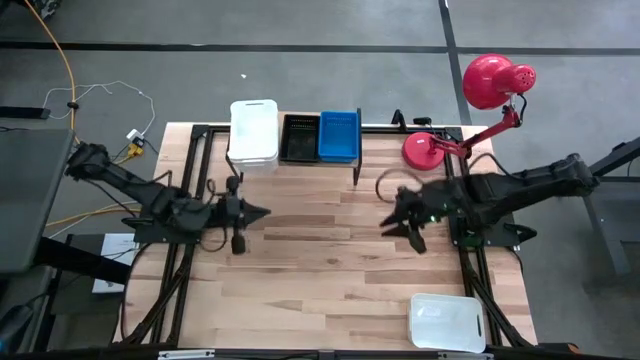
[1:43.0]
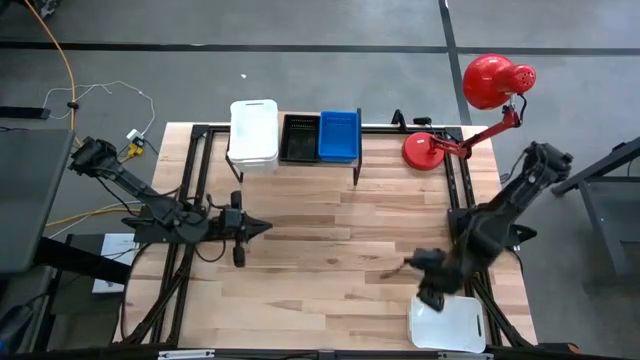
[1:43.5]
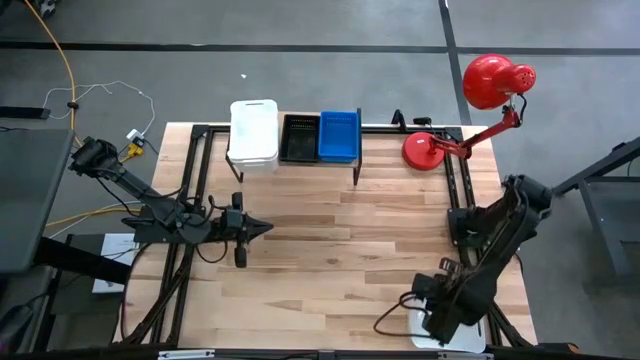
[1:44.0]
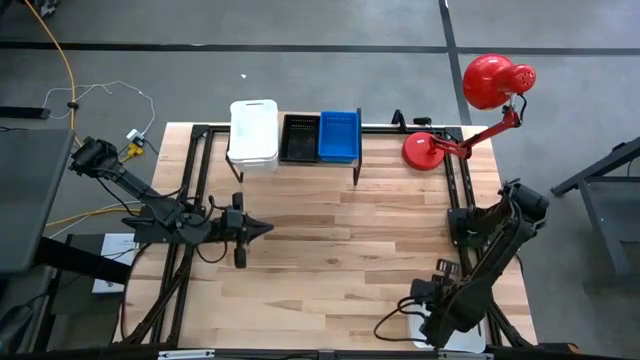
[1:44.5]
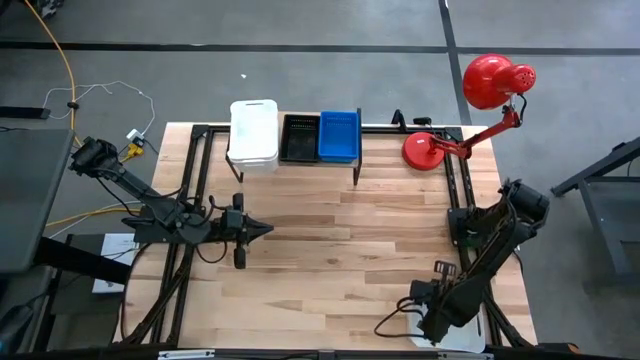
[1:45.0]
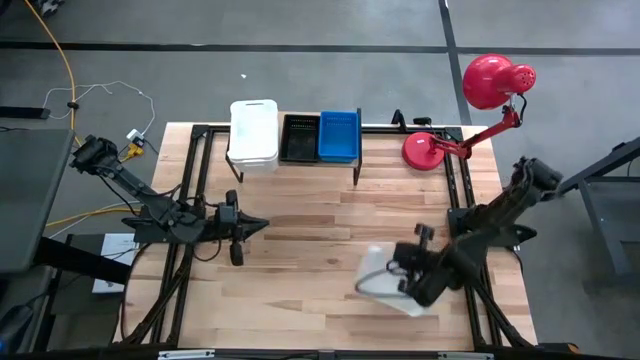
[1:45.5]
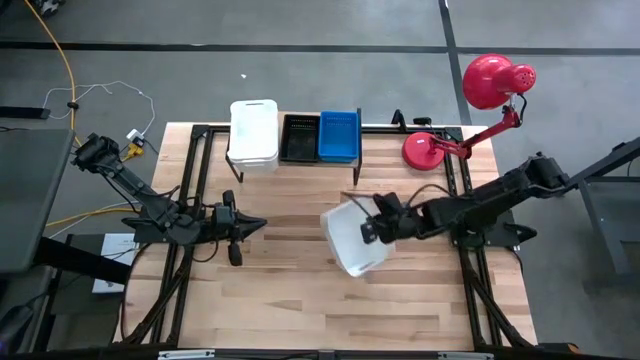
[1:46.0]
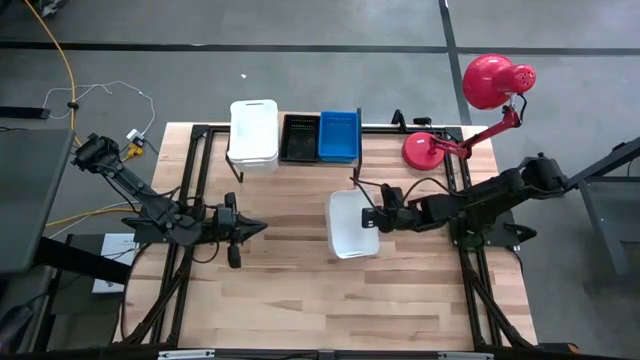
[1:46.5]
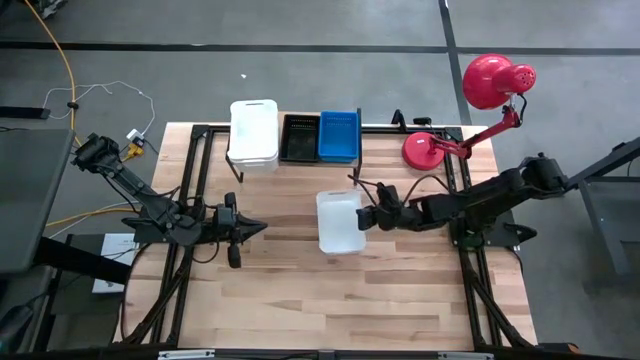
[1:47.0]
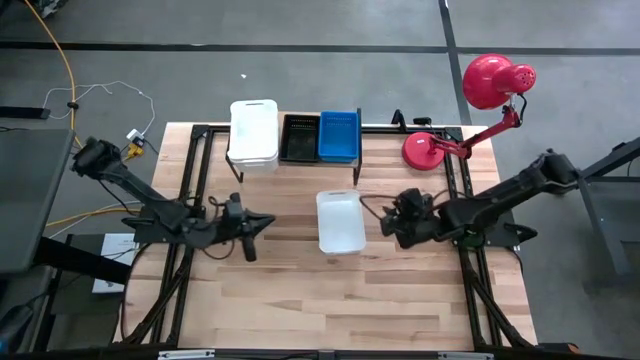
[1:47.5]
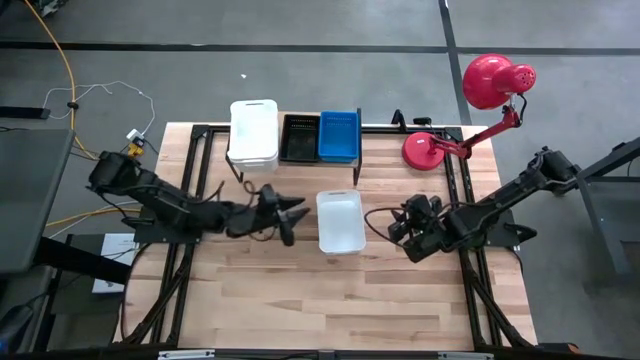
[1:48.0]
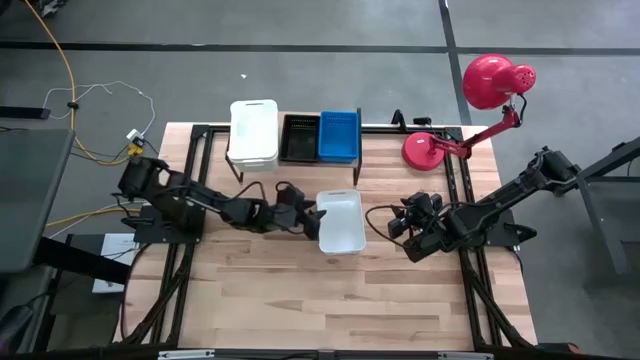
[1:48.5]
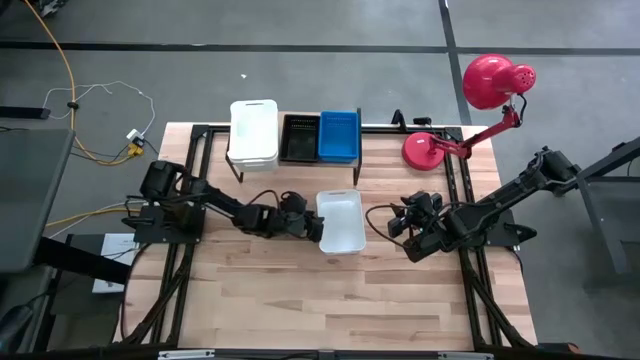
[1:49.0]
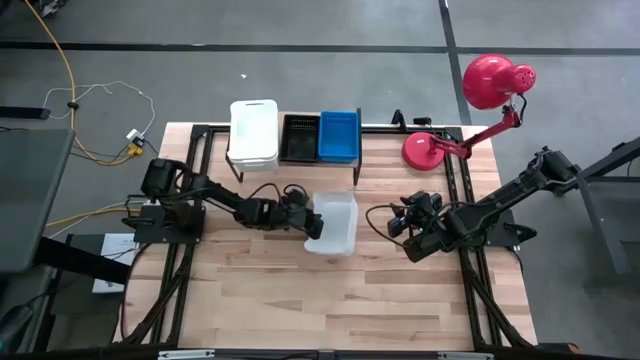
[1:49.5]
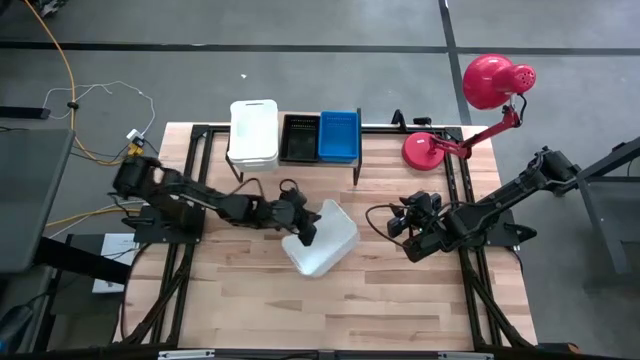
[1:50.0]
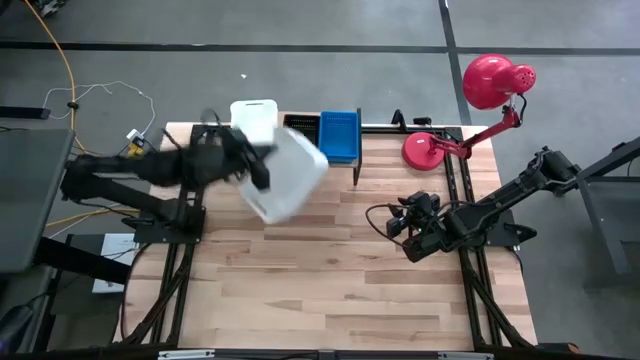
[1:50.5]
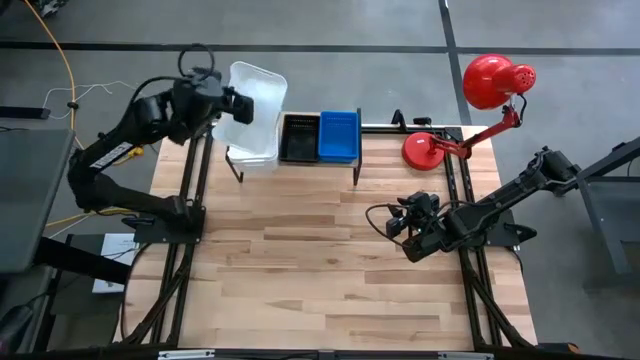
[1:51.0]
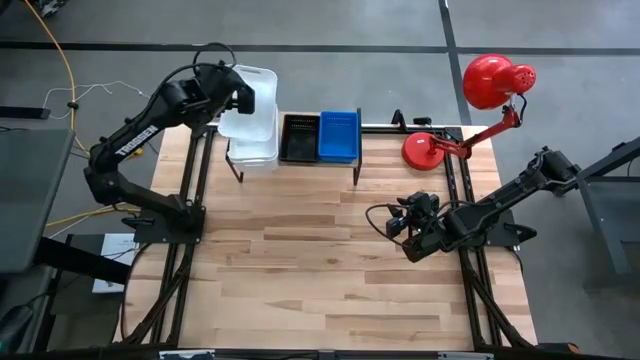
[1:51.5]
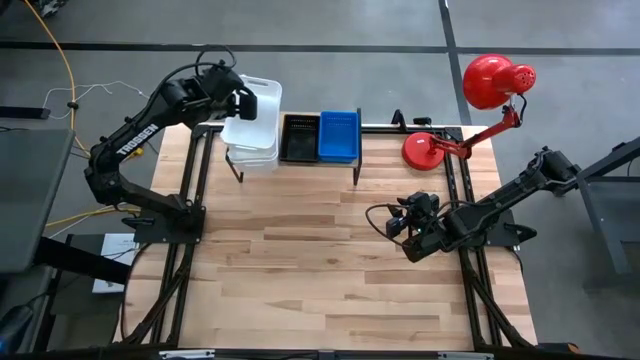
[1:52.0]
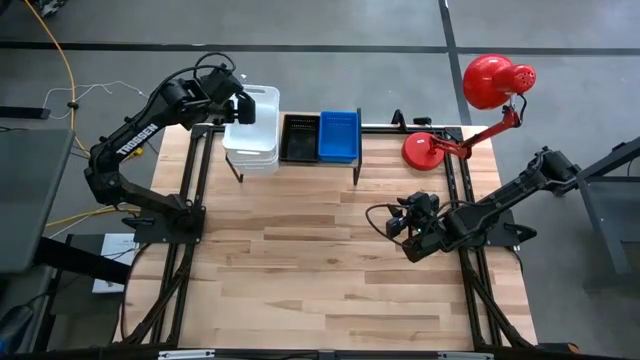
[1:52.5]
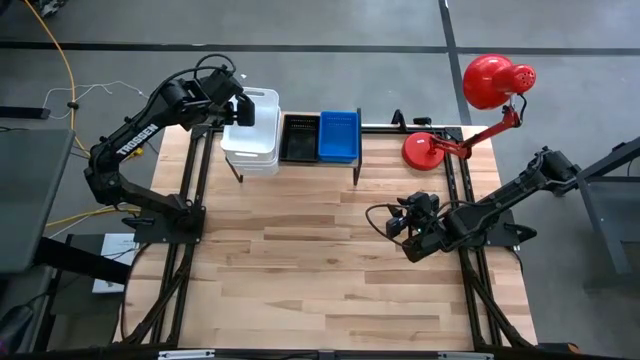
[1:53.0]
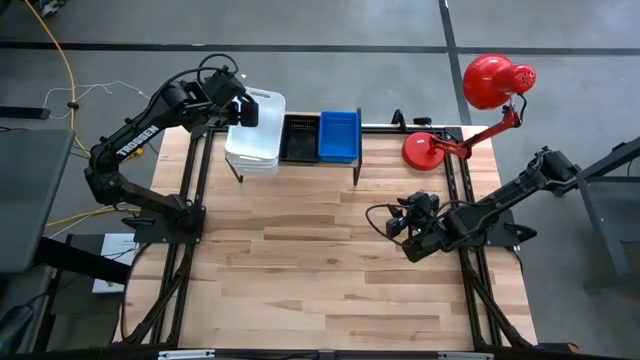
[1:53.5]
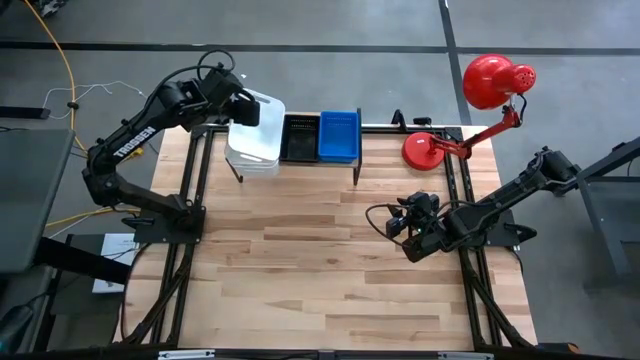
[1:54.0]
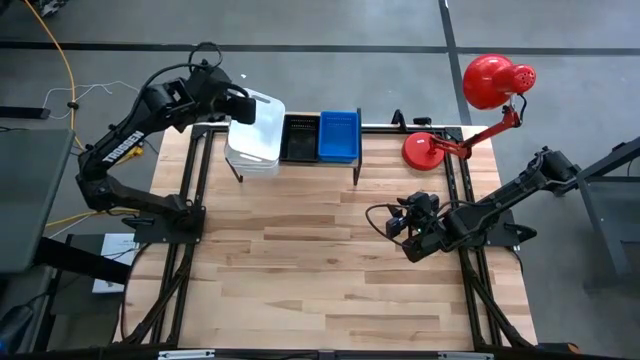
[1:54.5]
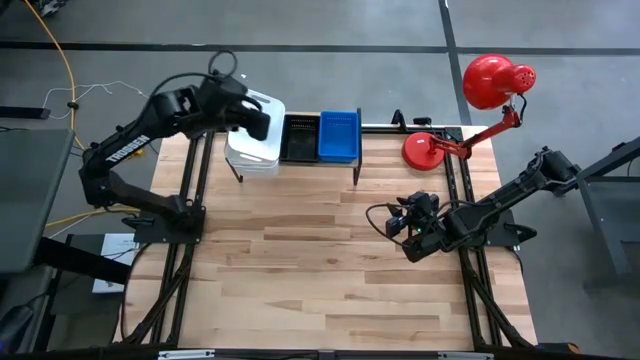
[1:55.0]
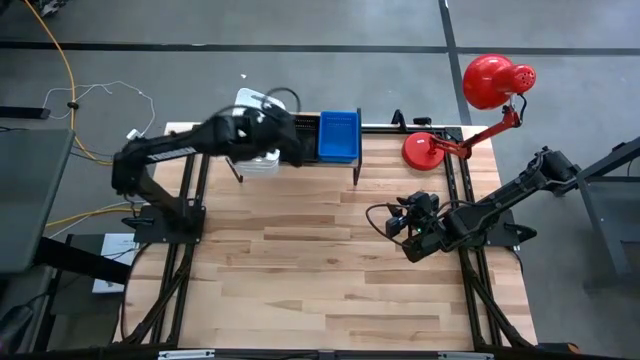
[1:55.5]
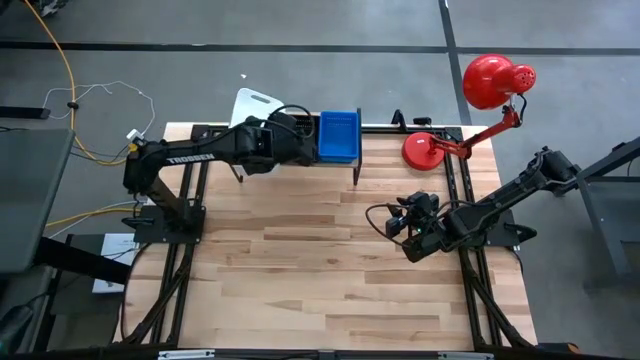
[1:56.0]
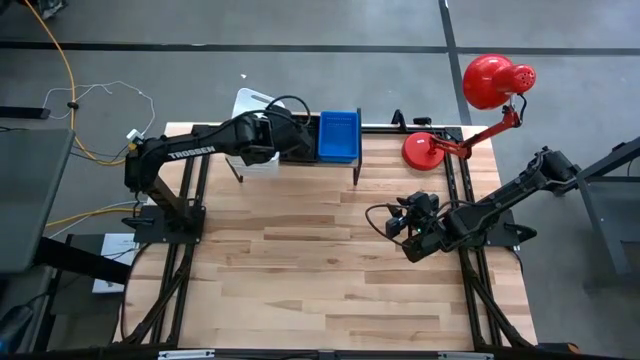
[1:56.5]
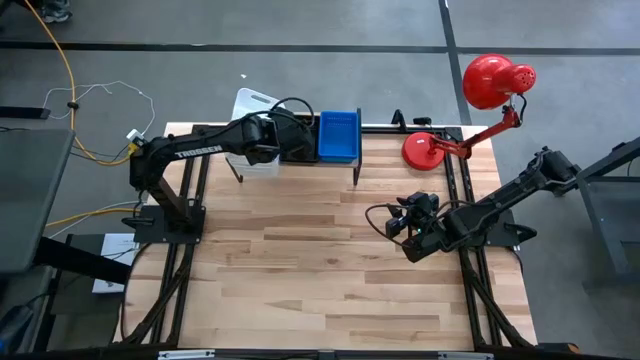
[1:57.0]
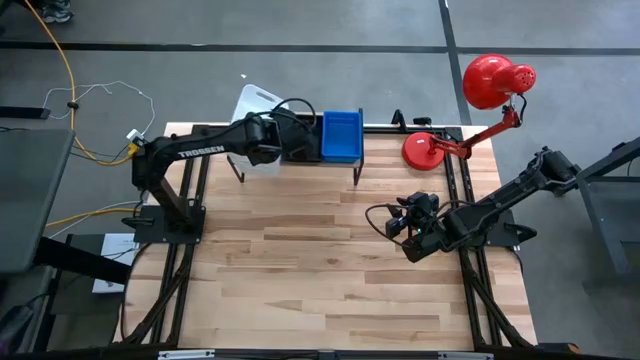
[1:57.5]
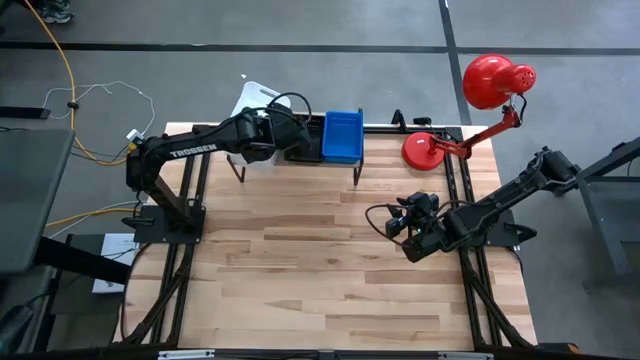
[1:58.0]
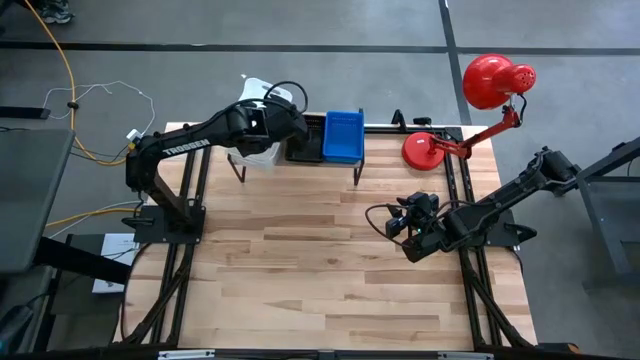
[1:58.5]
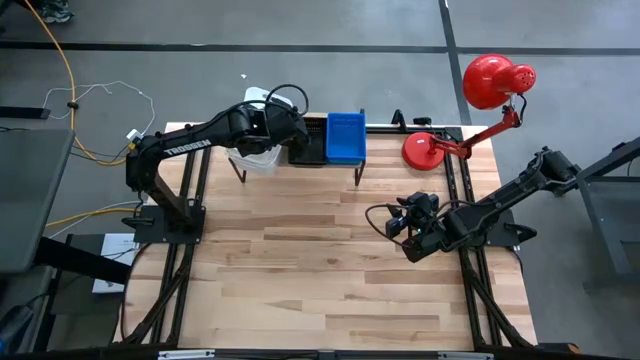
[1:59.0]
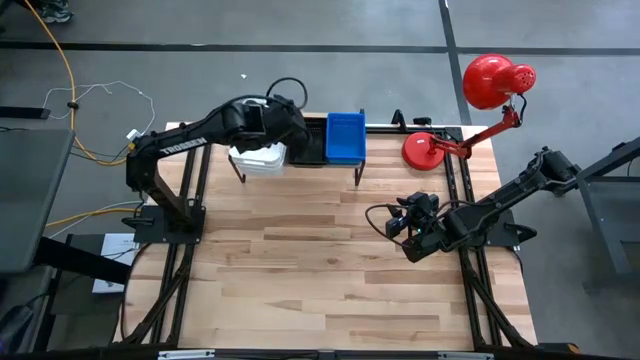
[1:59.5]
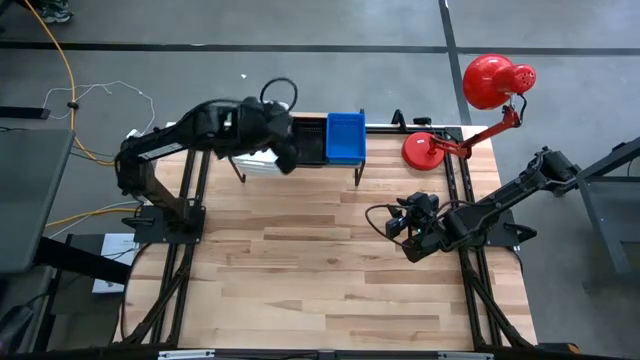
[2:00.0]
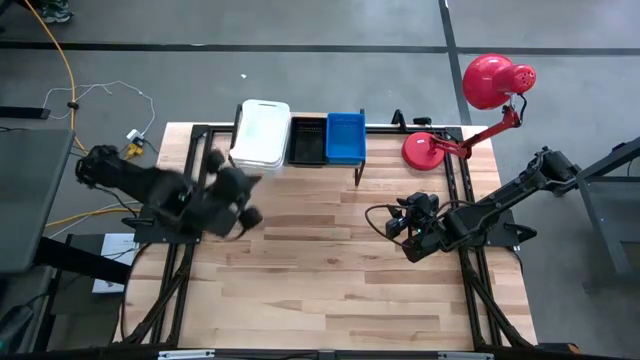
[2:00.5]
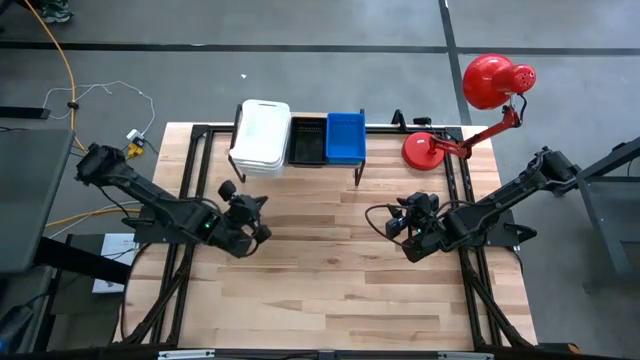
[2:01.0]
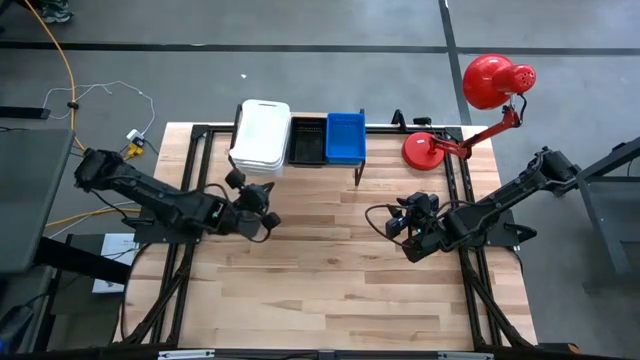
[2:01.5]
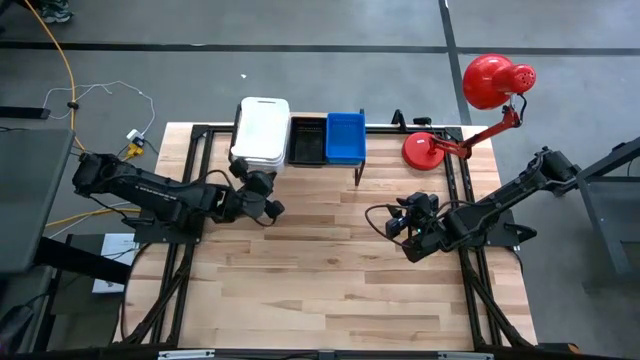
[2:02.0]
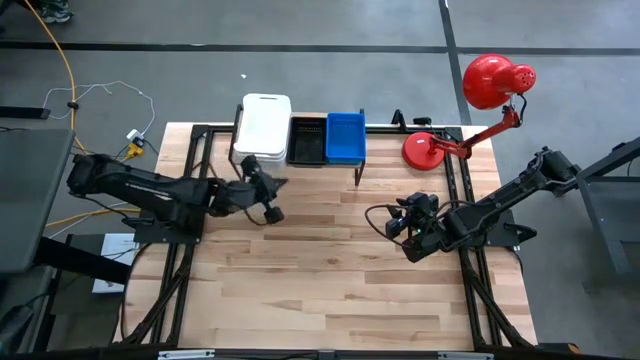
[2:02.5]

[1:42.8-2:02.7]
Task: Stack baskets on shelf by color
Stack the white bin on the white bin on the shelf

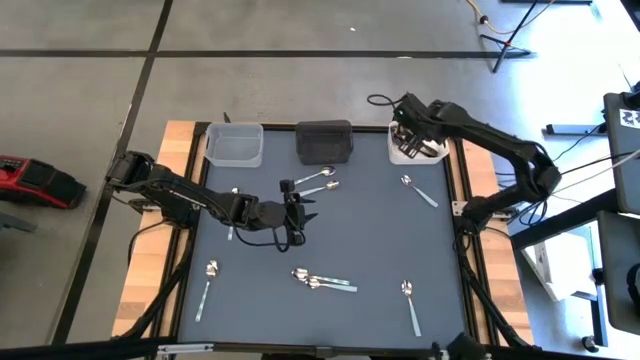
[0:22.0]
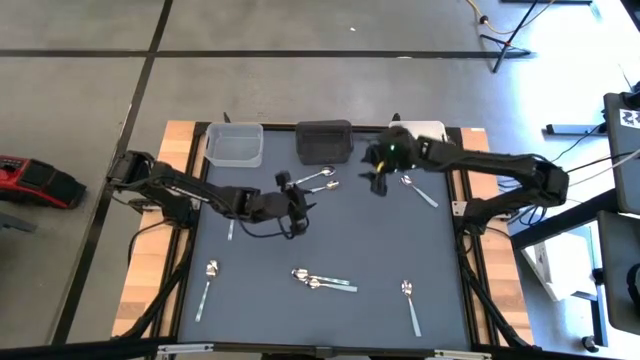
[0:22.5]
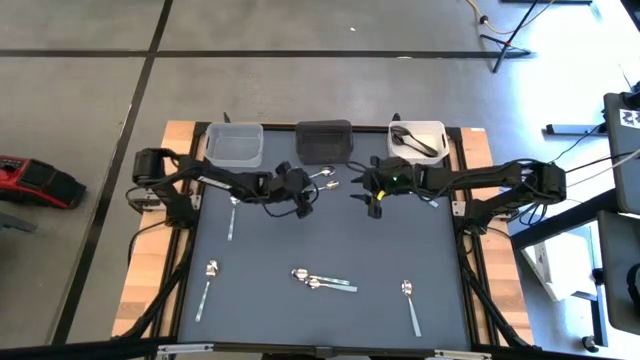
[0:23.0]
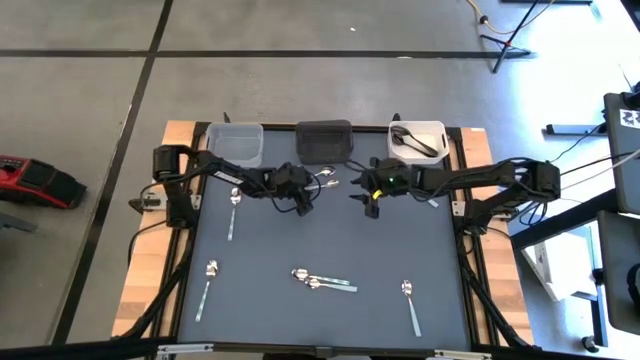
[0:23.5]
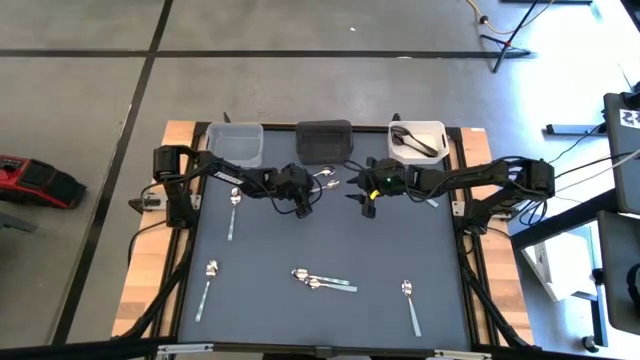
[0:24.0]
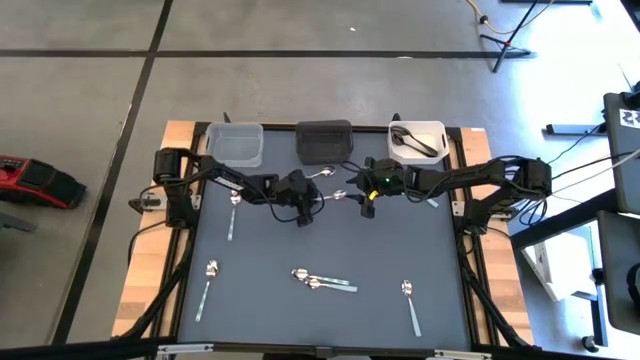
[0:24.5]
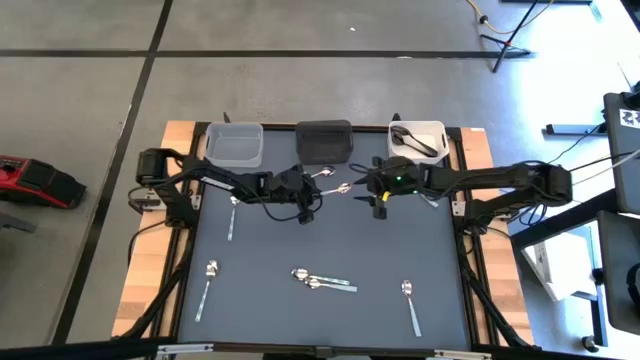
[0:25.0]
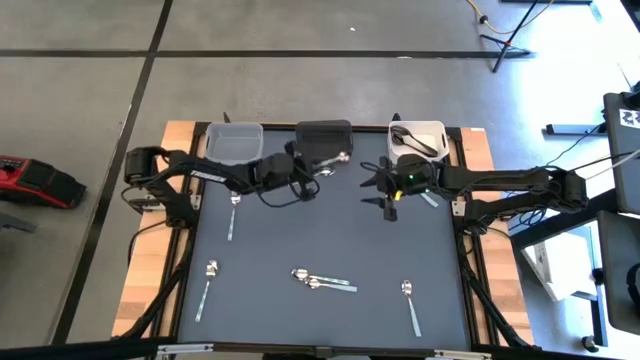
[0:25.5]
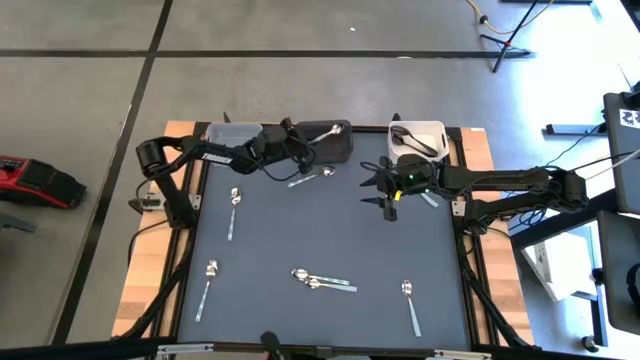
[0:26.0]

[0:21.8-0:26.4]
Task: Sort silverware by color (type)
Put the blue spoon into the black bin
